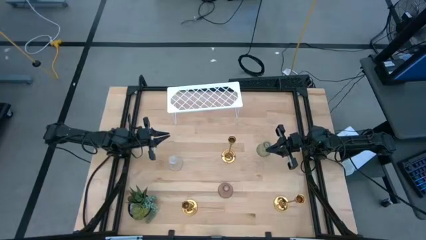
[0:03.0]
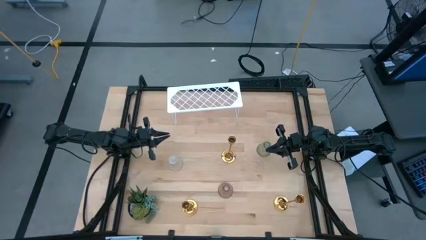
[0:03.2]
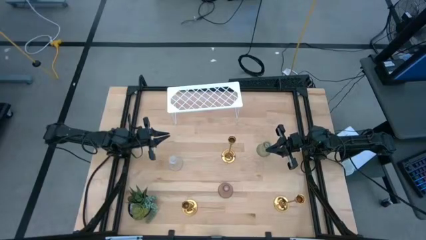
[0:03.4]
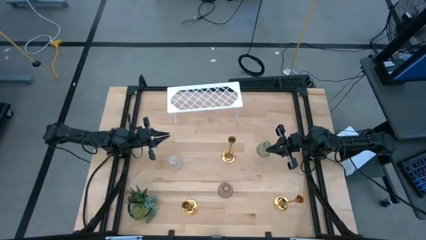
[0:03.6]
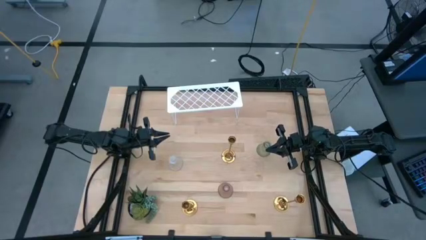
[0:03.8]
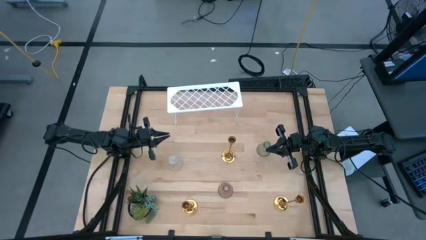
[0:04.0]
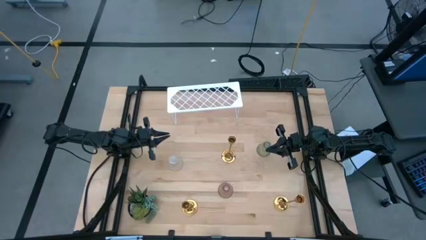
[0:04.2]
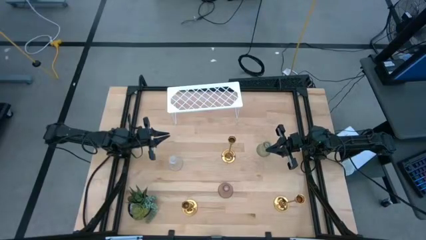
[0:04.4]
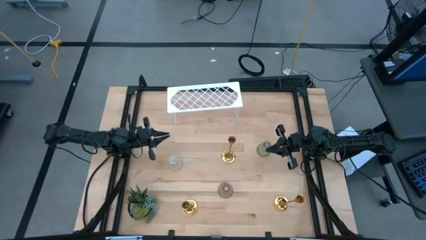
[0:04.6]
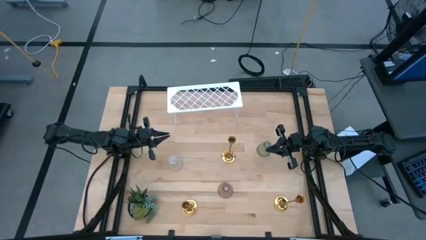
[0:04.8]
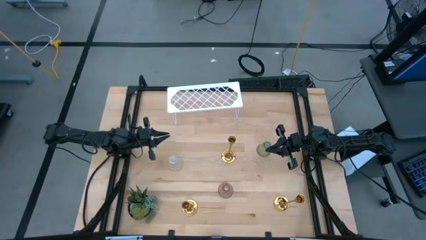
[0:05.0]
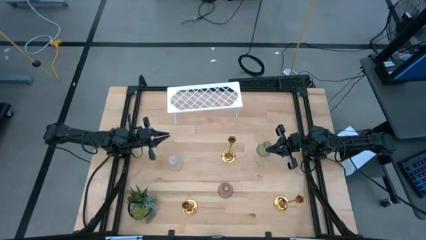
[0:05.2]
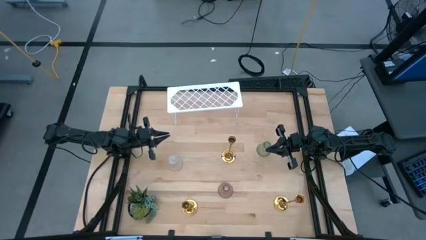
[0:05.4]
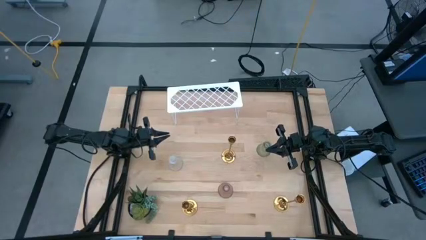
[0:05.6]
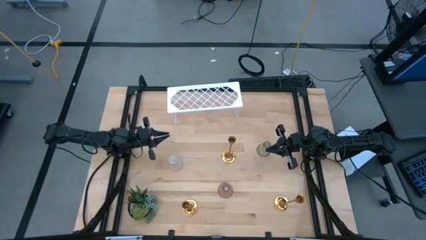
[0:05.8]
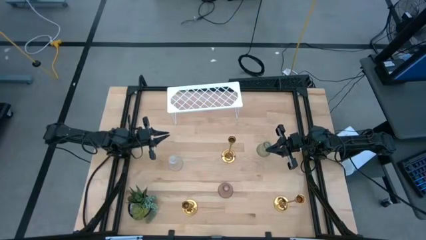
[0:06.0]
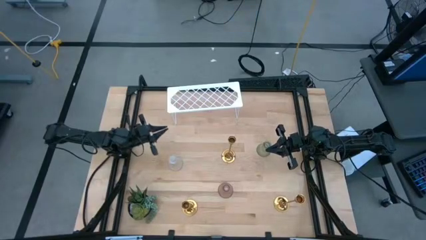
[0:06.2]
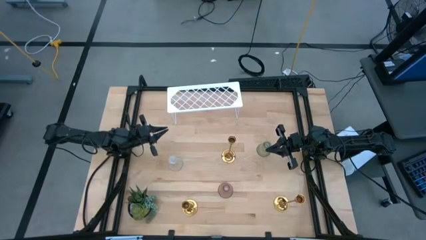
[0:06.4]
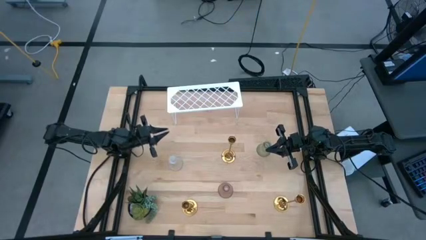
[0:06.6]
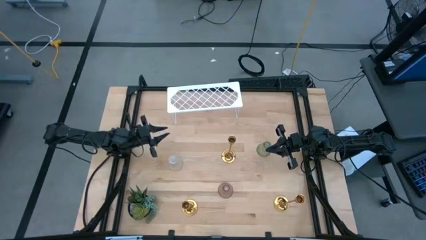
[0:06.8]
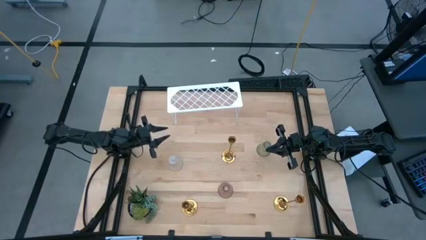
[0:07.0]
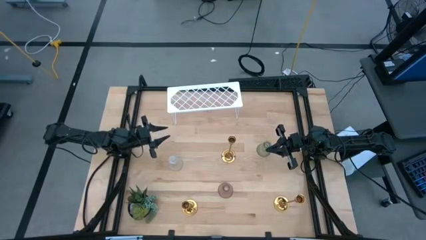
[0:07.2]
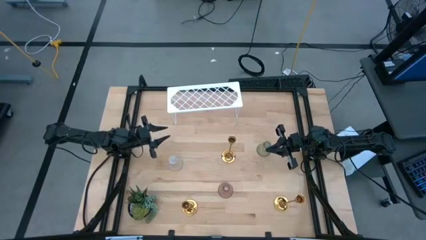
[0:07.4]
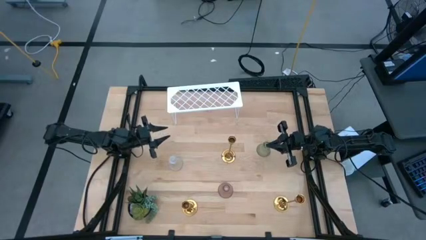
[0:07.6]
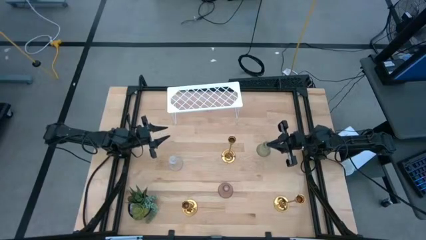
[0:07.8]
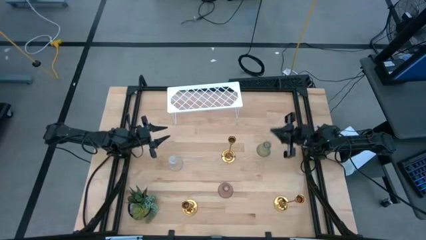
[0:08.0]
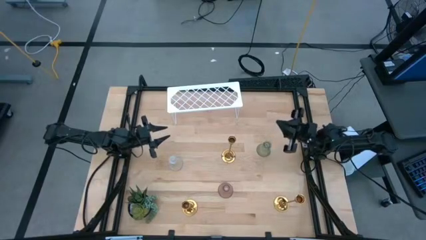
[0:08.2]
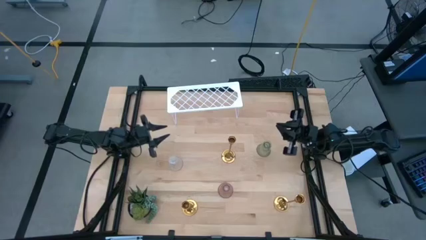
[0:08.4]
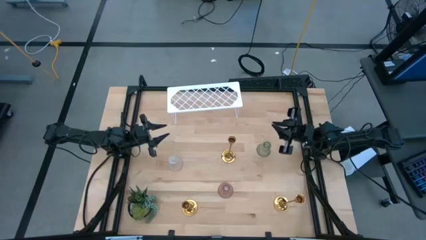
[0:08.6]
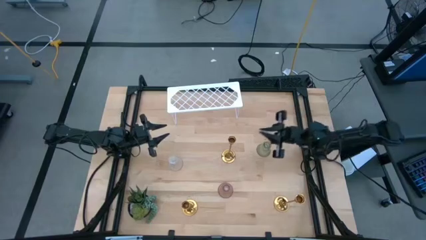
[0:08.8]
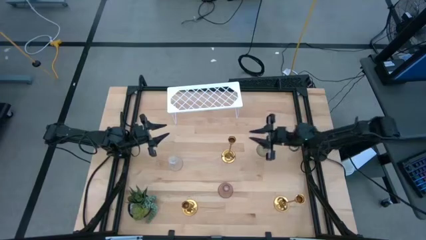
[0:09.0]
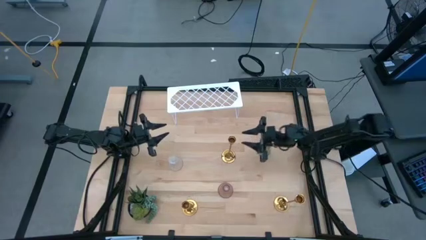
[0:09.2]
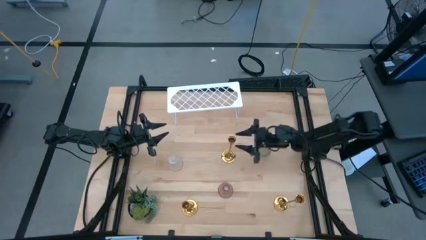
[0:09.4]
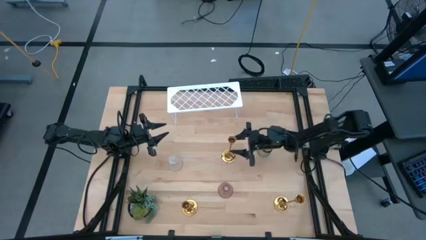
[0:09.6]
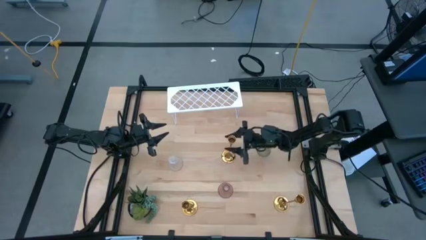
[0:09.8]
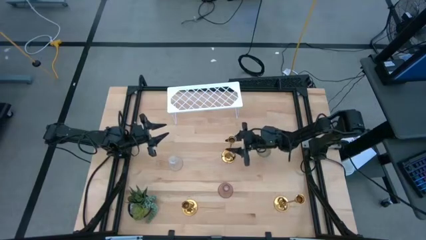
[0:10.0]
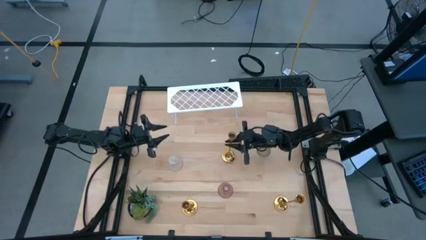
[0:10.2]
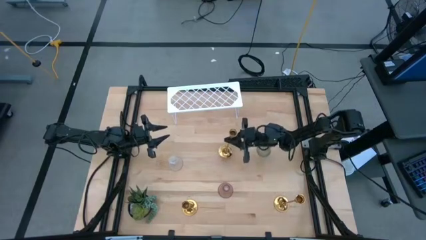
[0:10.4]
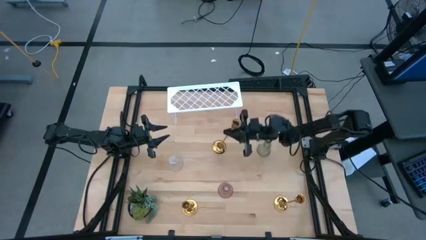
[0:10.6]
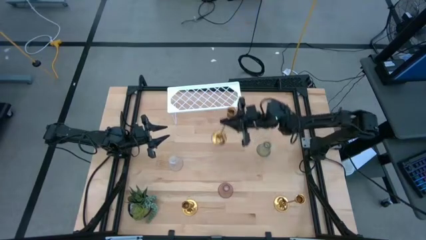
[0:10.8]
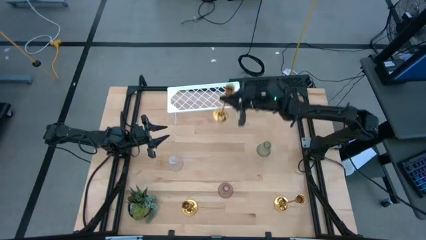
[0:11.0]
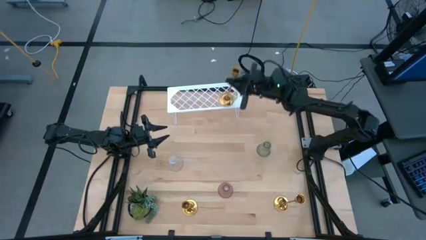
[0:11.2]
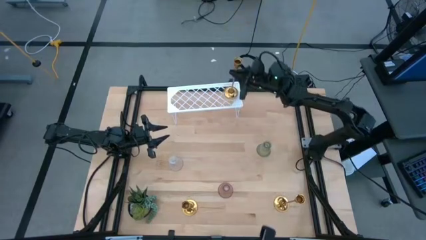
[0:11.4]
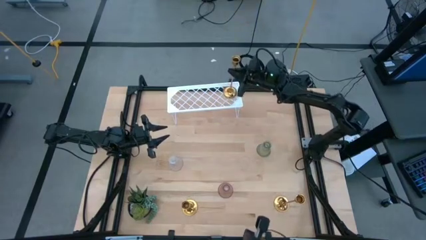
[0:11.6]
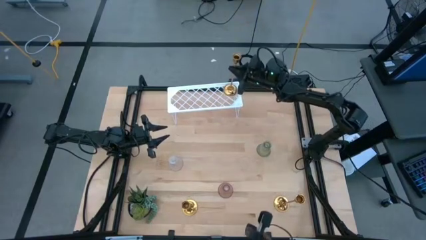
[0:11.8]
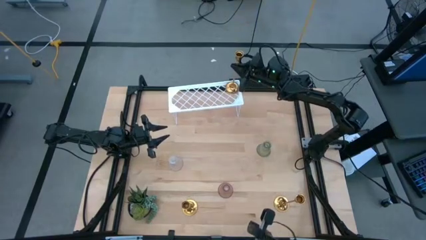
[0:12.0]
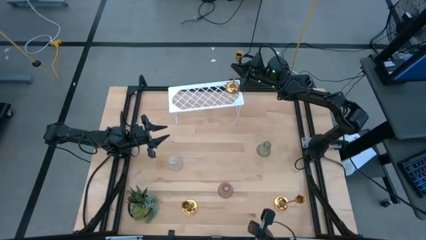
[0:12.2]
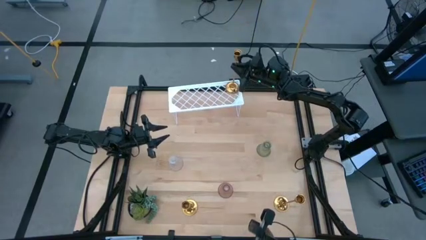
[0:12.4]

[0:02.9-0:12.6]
Task: Pick & Place candle stick holders
Put the top golden candle holder on the shelf

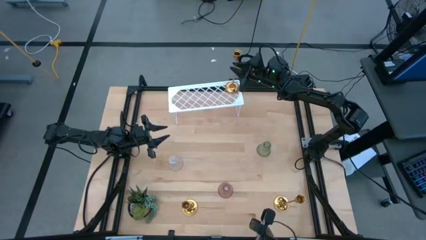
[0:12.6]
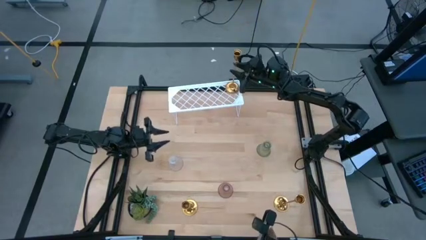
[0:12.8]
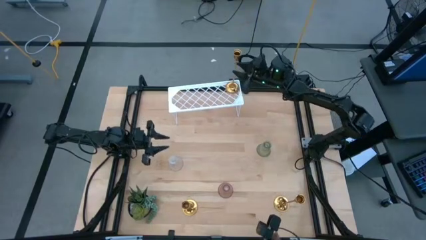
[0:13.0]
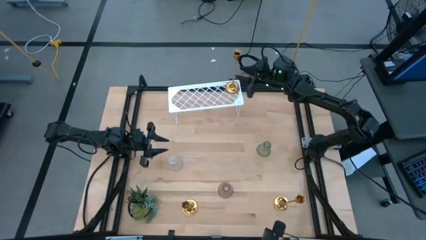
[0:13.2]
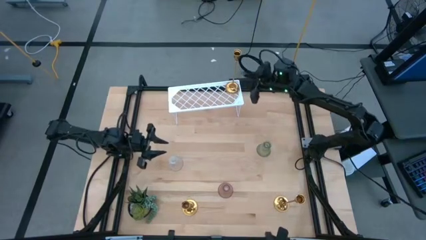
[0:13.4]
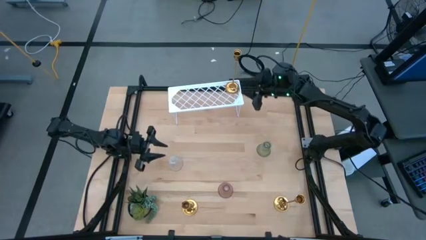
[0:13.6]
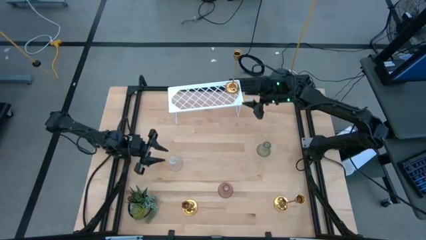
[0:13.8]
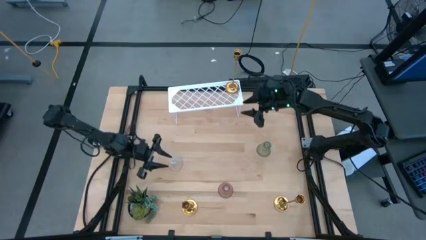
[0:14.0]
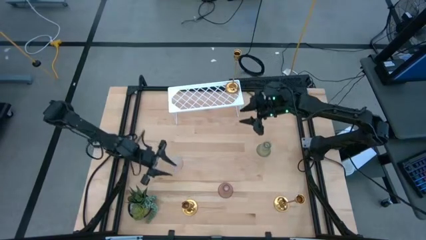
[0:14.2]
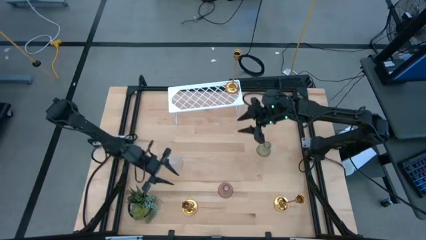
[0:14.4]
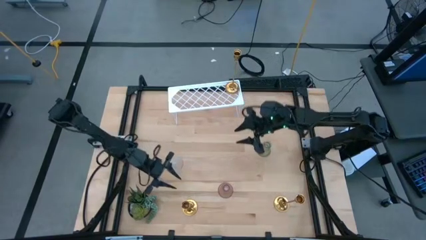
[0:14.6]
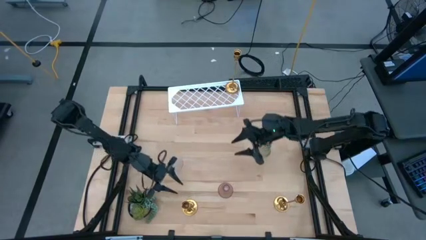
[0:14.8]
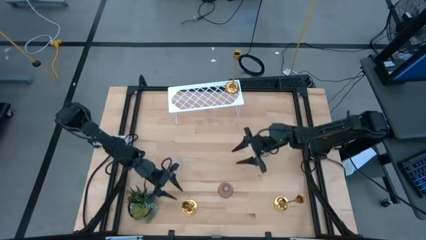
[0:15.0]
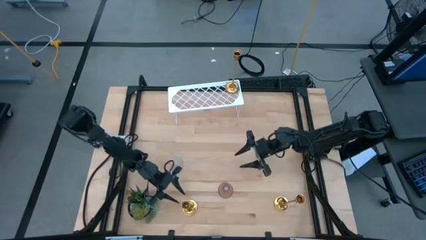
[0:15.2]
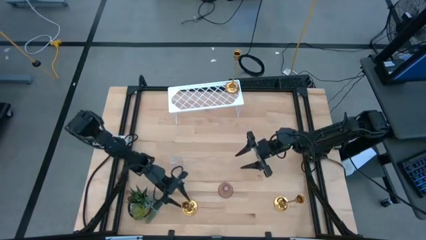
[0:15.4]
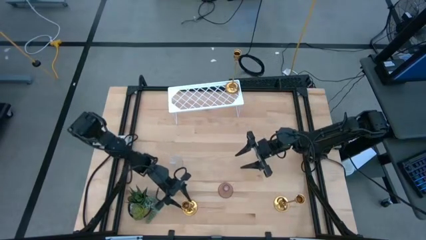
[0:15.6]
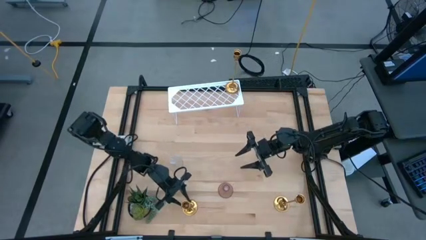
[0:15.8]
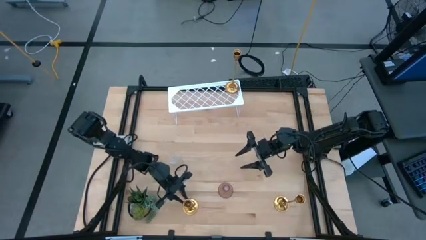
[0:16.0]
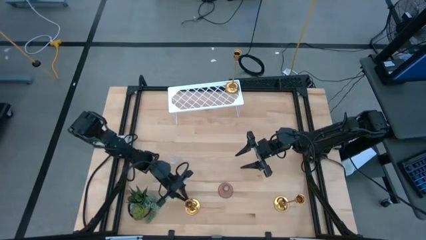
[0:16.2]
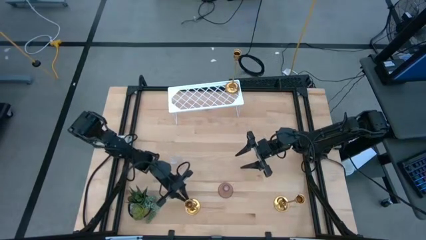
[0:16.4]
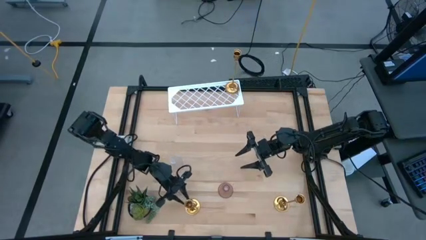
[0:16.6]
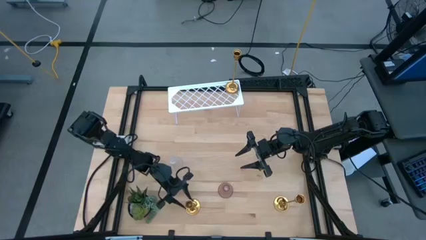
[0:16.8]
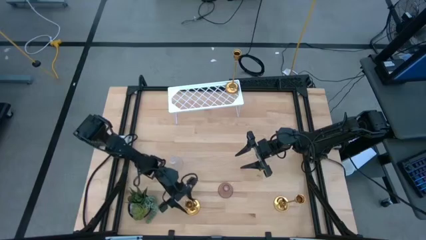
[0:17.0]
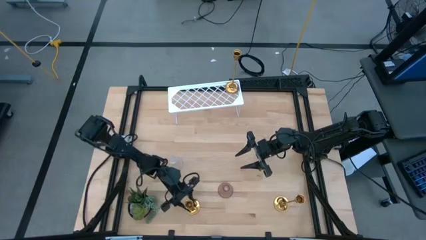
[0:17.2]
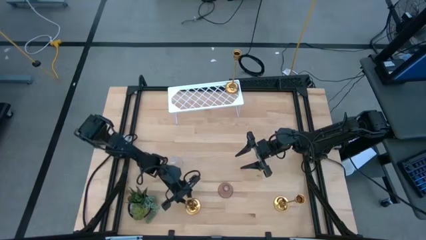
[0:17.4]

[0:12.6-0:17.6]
Put the left golden candle holder on the shelf aligned with the other golden candle holder

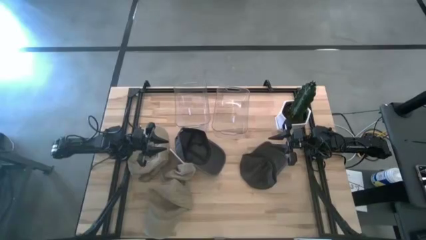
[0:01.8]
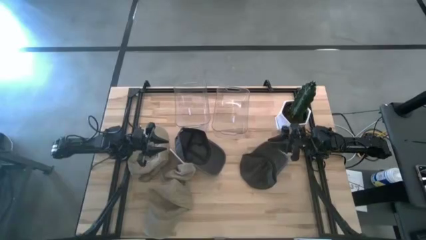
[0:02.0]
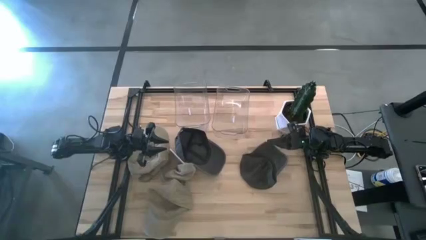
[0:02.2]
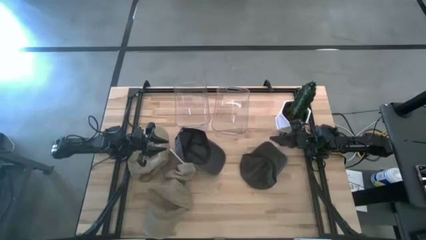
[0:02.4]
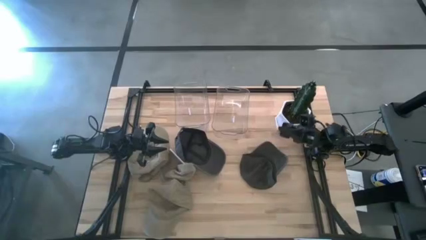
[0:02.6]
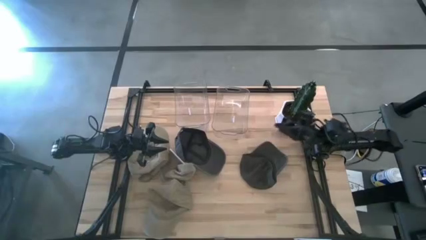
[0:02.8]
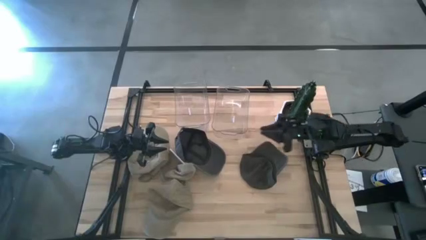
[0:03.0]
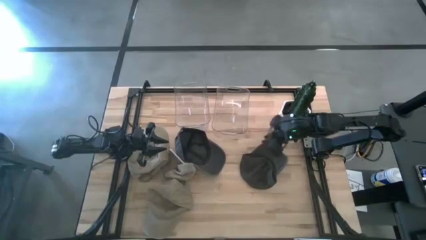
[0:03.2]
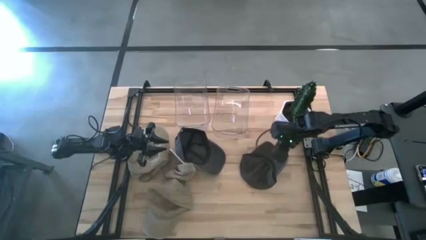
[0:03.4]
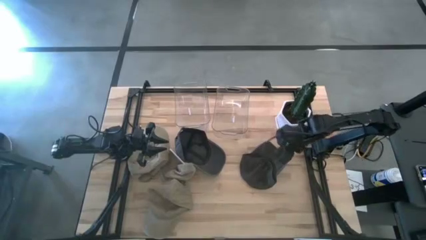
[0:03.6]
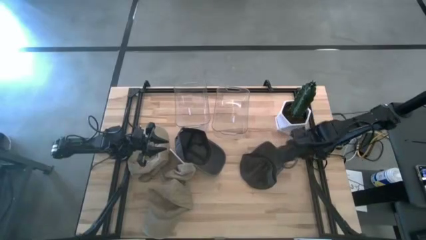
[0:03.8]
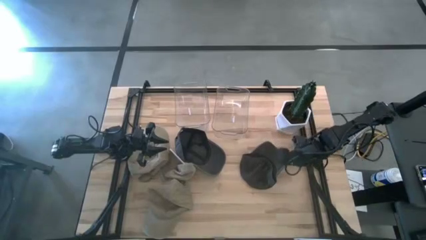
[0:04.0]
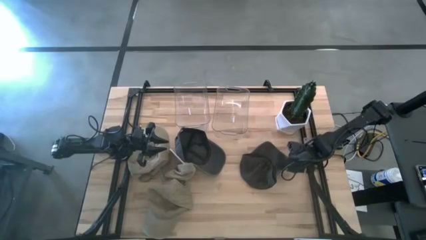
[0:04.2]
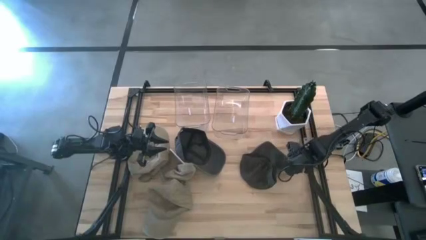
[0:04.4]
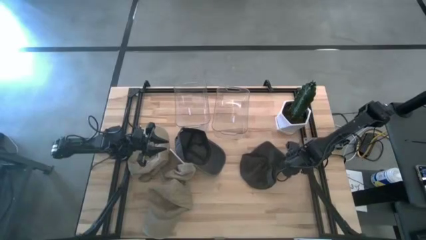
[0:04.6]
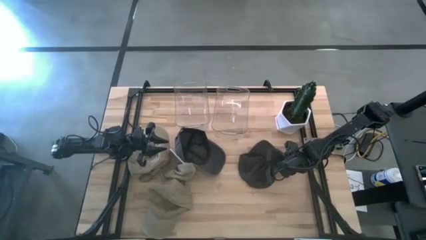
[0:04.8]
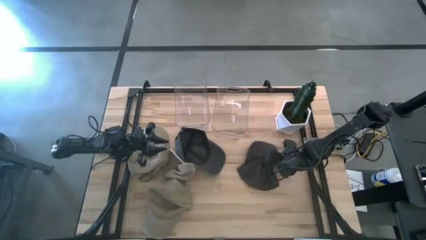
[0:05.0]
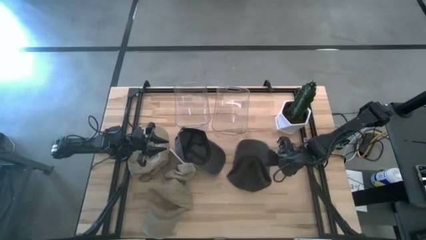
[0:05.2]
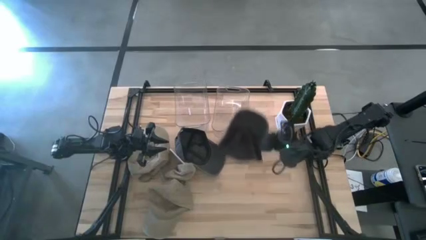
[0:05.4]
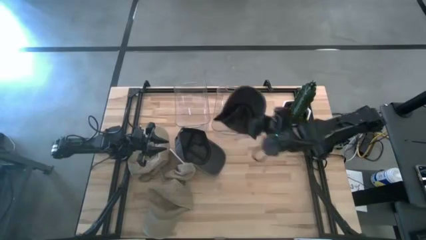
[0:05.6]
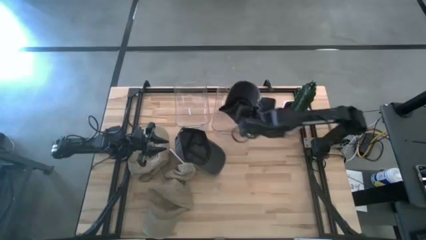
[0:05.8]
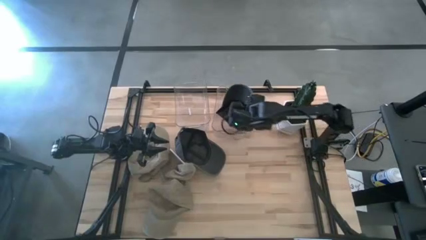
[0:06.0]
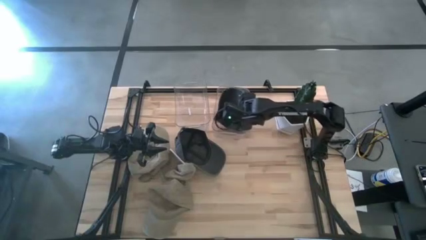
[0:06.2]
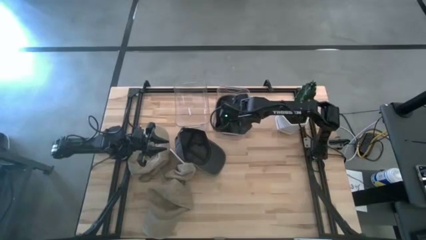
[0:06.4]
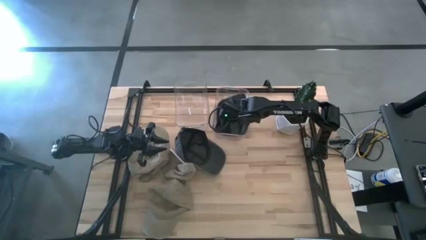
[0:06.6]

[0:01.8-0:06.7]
Task: Pick & Place hat
Put the right black cap into the right transparent bin
